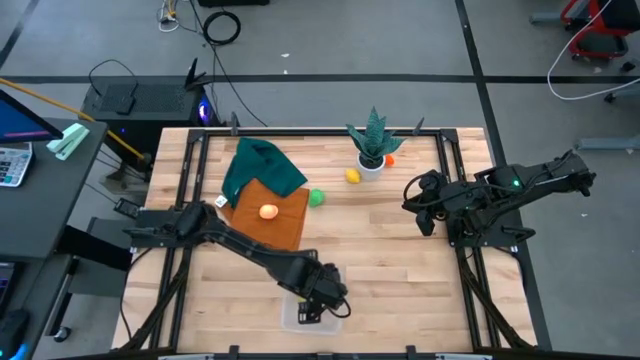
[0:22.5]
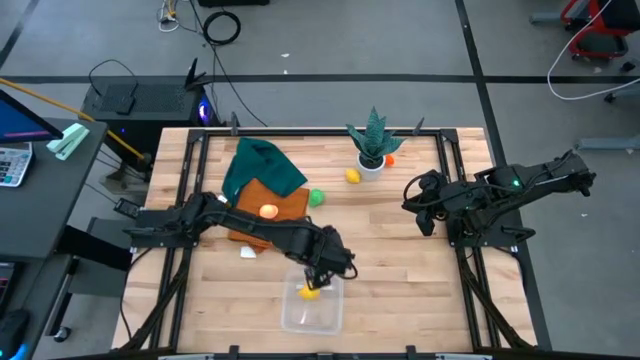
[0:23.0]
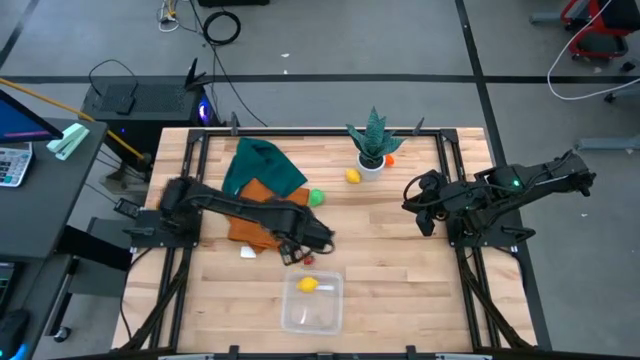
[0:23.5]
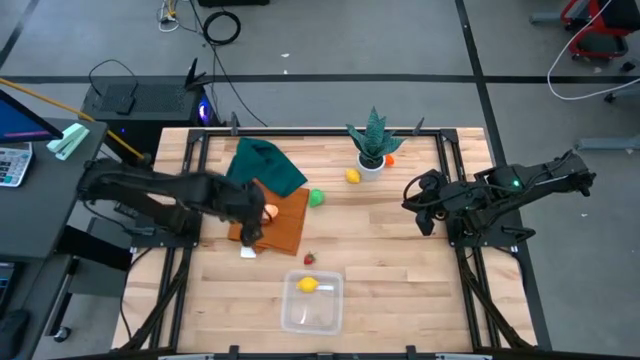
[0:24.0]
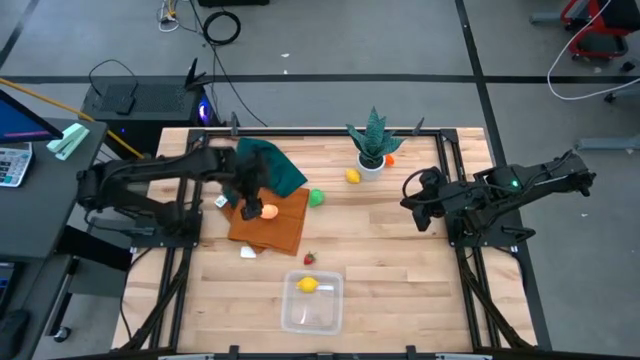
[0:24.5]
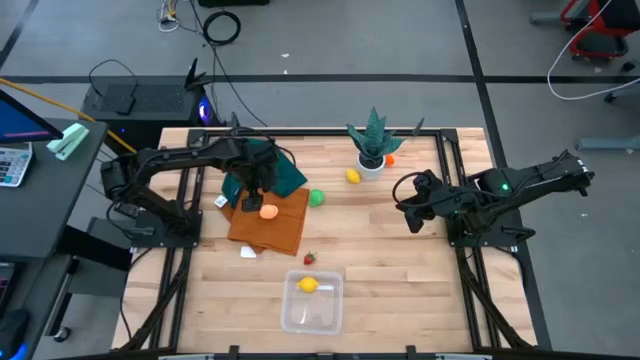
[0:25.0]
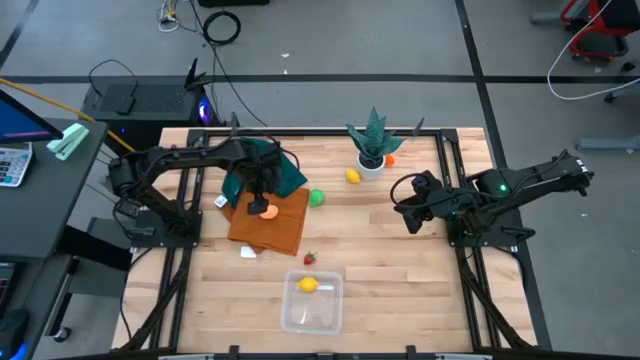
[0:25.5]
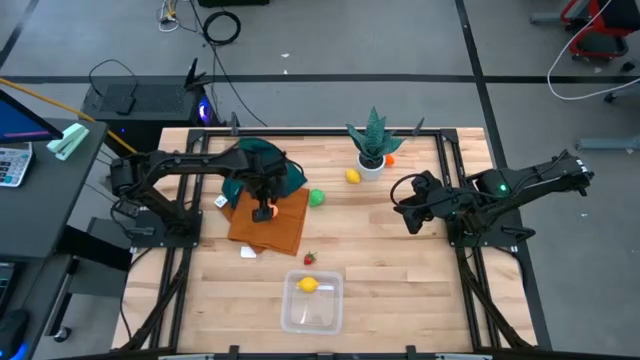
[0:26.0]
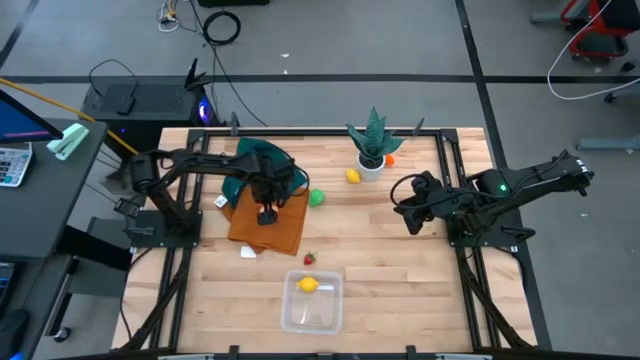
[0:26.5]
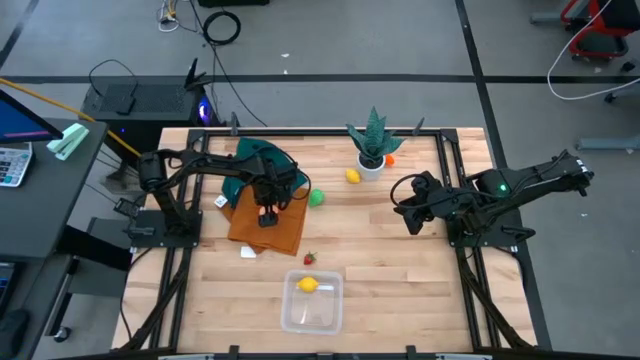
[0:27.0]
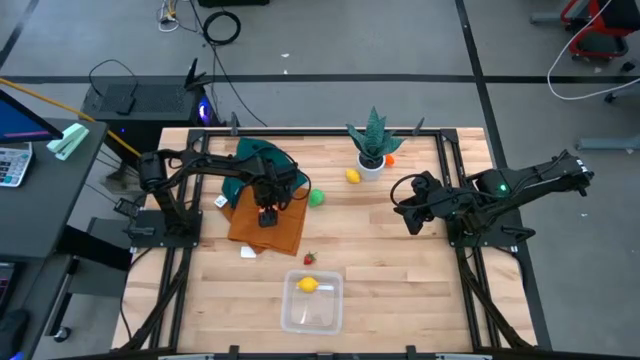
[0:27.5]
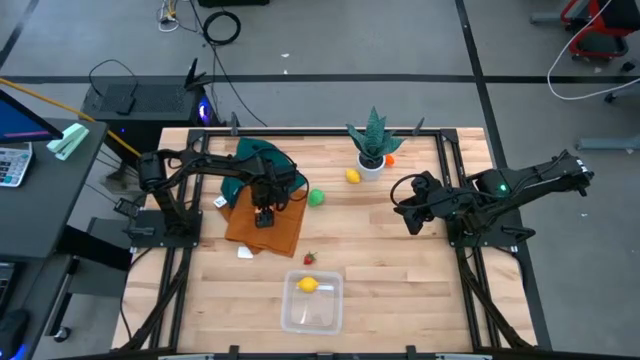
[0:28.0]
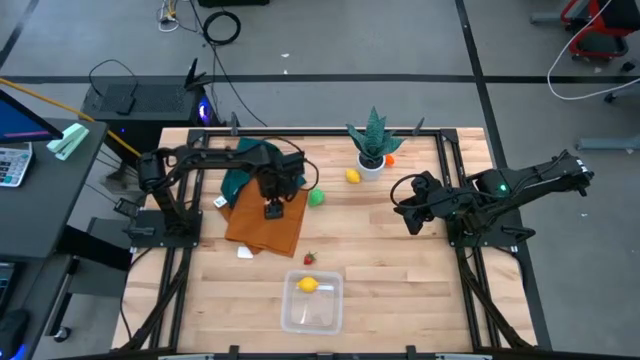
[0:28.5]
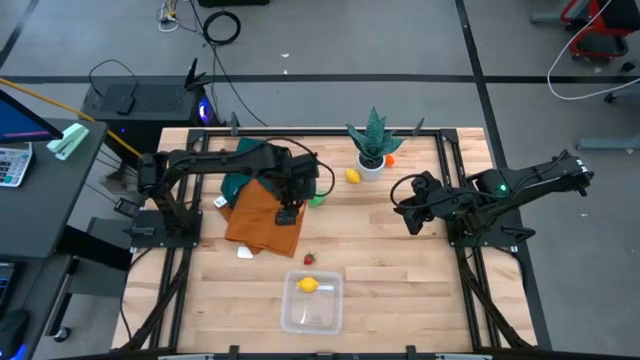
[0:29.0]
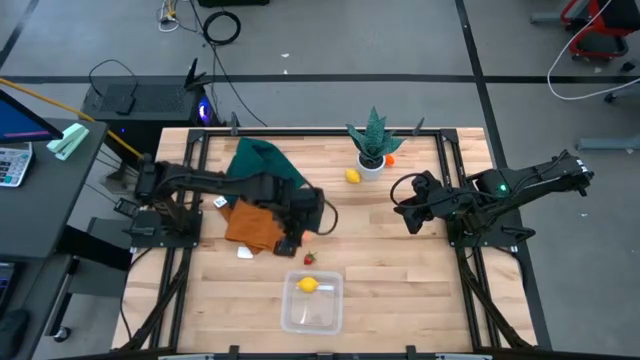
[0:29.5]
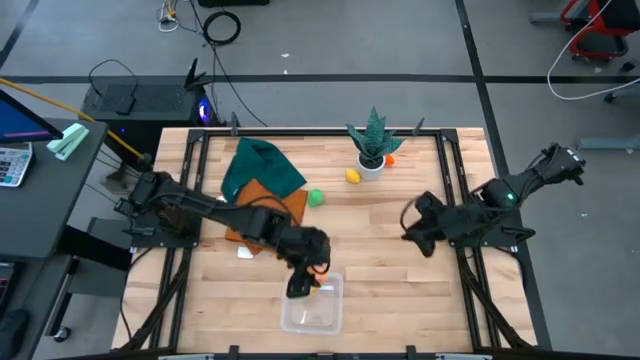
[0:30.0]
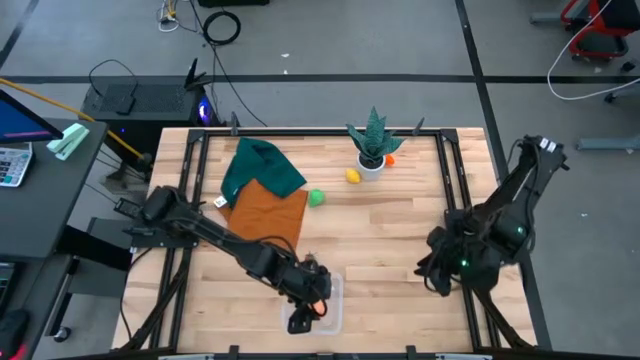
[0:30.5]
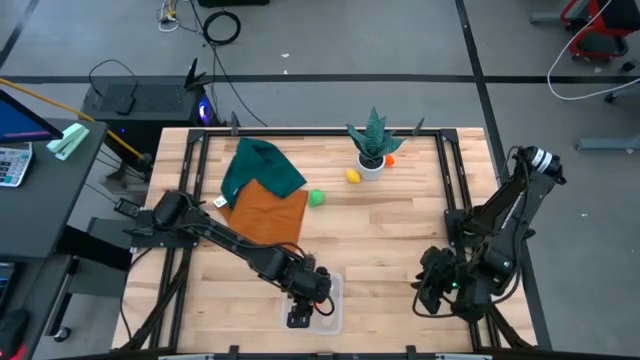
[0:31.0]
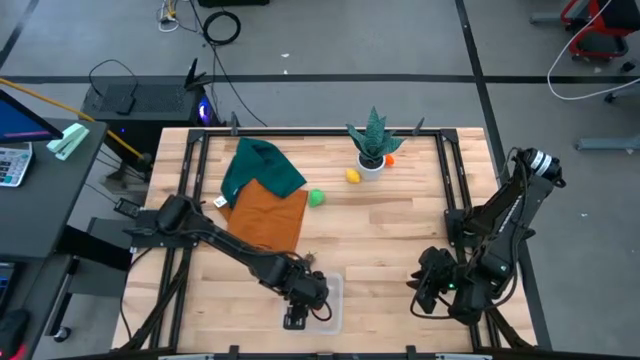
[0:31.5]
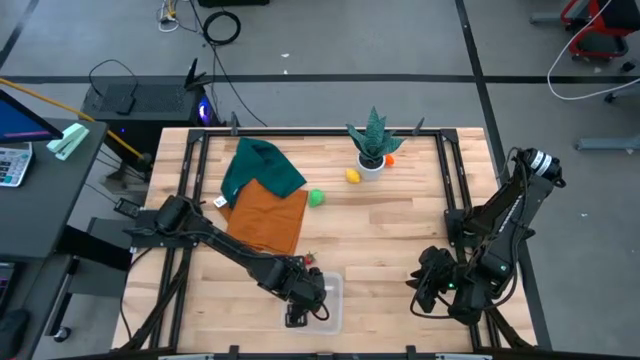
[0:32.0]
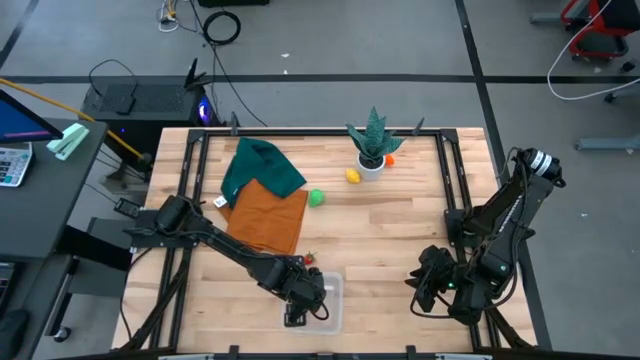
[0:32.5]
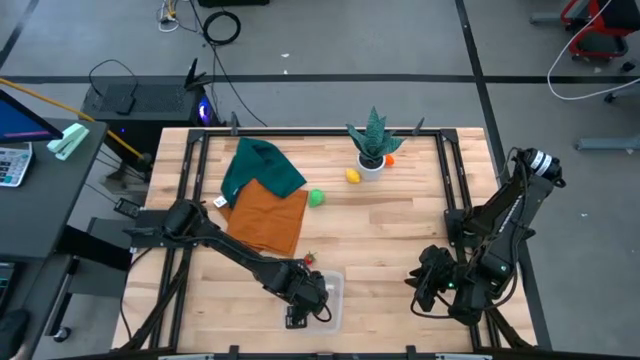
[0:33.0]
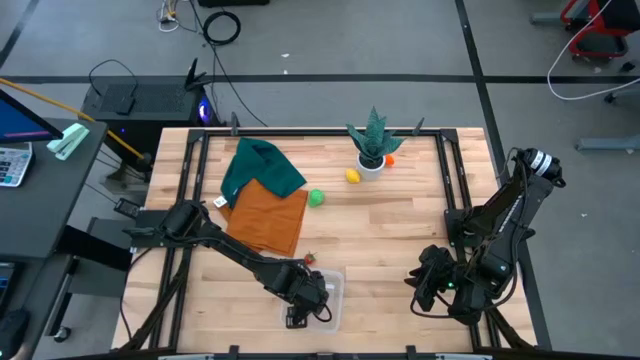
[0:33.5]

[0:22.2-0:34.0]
Task: Pick and placing Produce into tupperware
Put the pink peach into the transparent bin

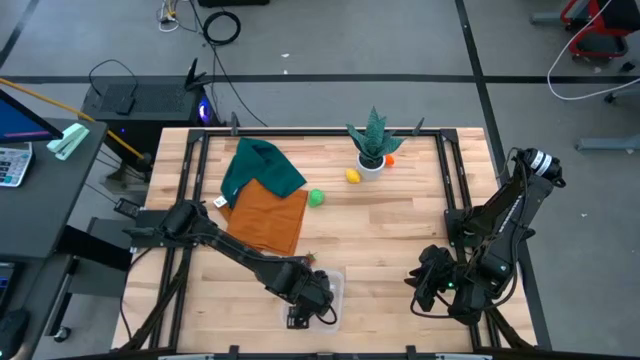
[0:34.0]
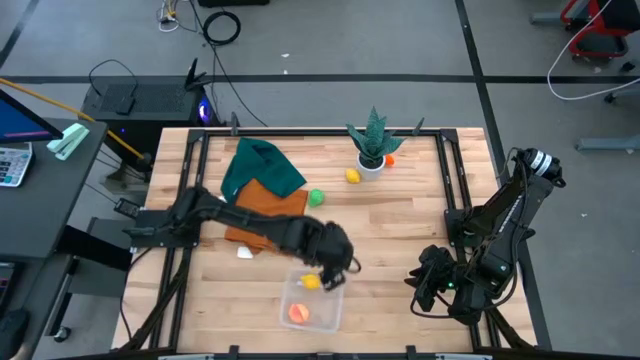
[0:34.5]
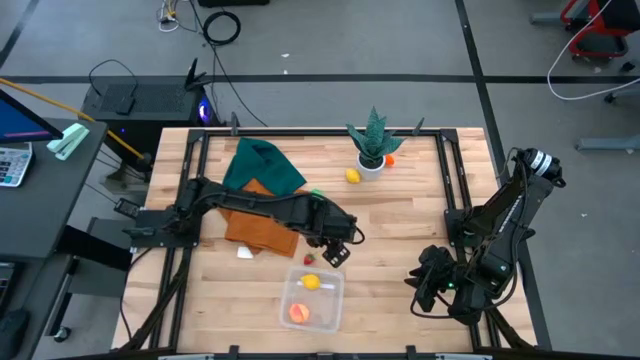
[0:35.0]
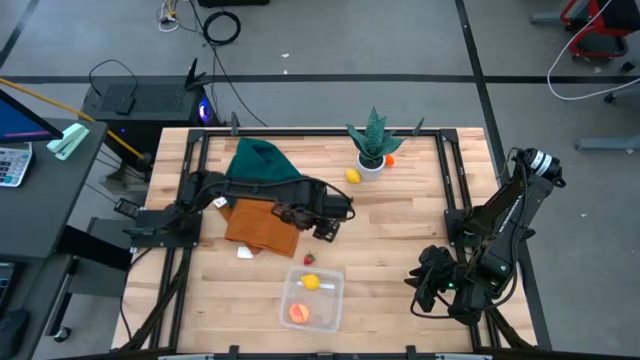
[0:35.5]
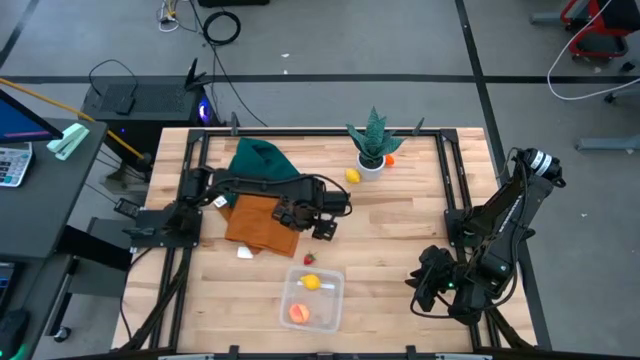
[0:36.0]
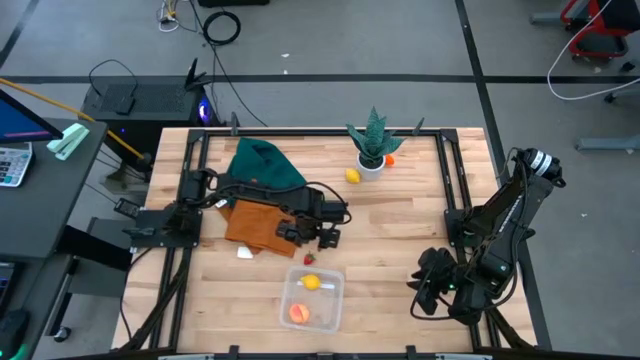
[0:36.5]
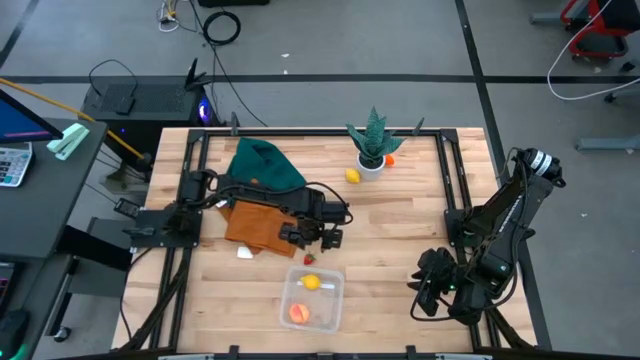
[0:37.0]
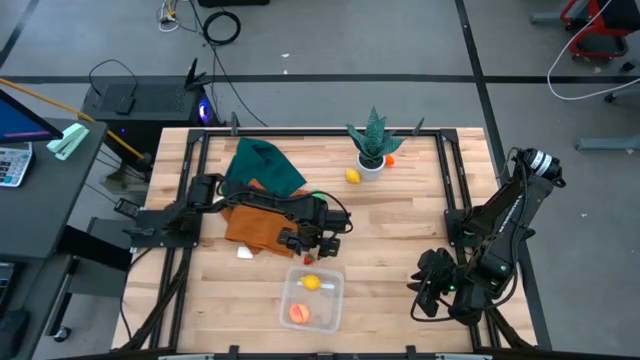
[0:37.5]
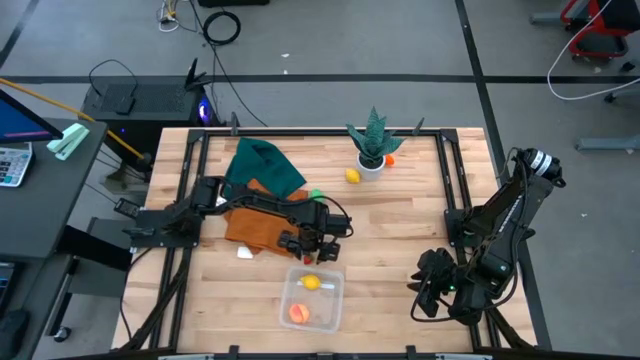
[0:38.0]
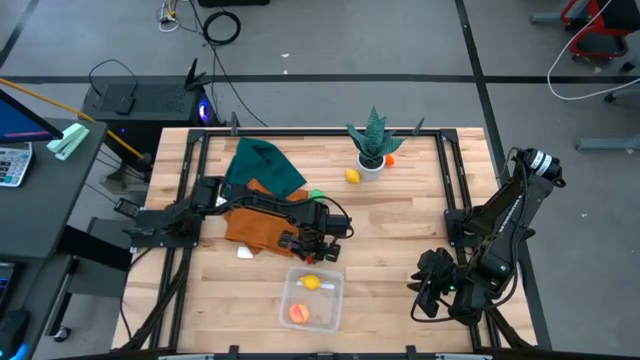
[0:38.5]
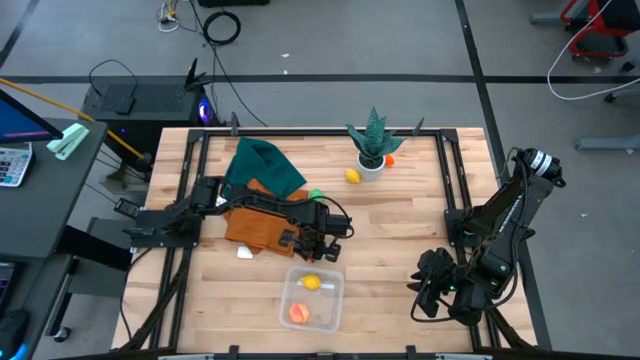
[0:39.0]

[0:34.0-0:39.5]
Put the red strawberry into the transparent bin

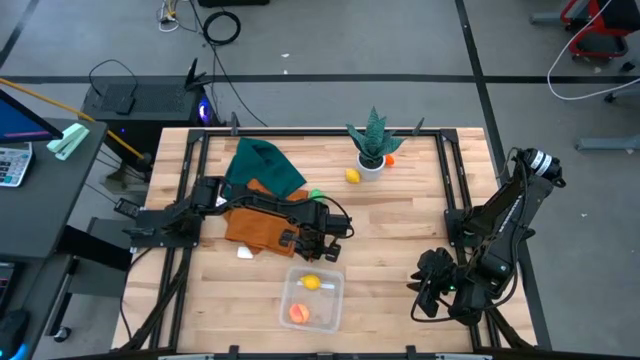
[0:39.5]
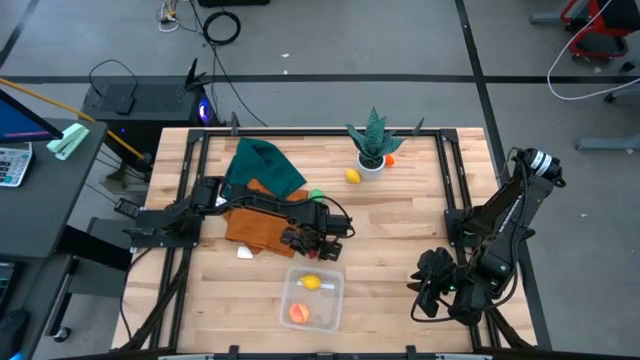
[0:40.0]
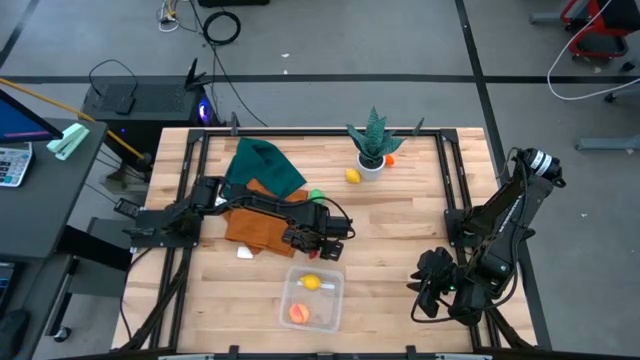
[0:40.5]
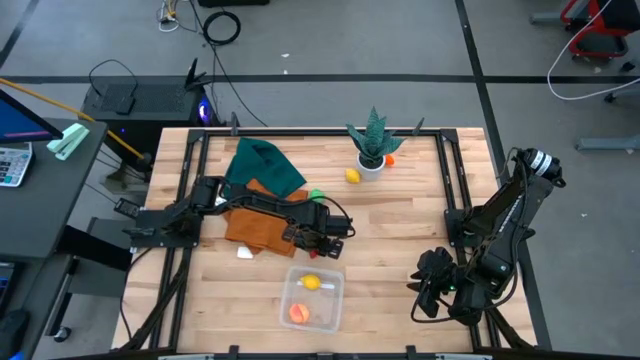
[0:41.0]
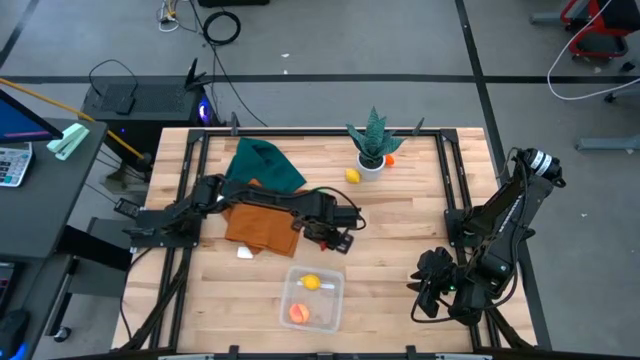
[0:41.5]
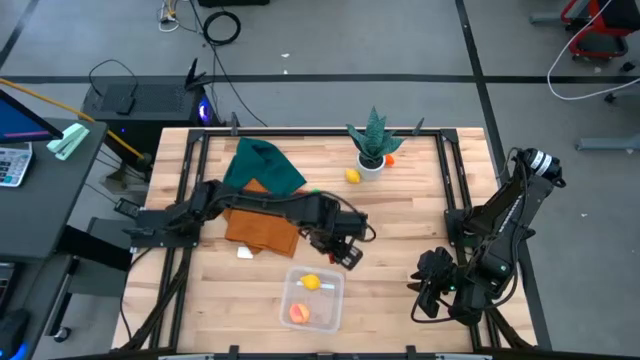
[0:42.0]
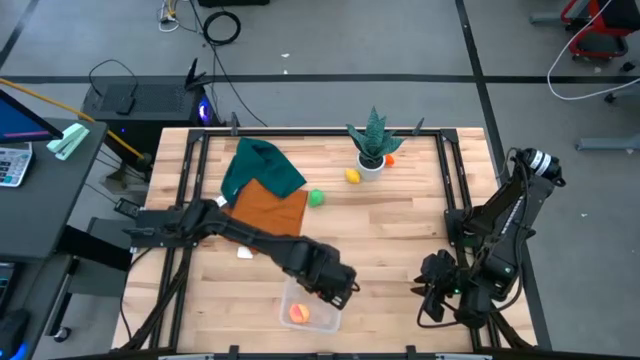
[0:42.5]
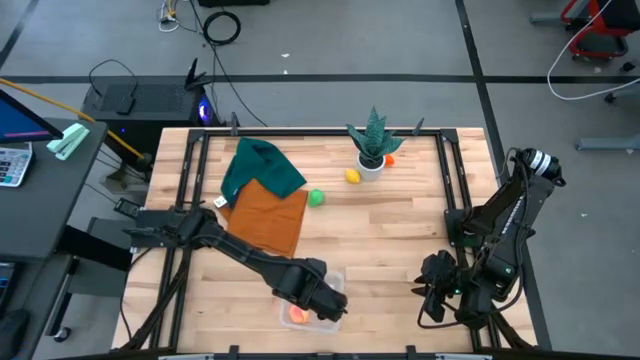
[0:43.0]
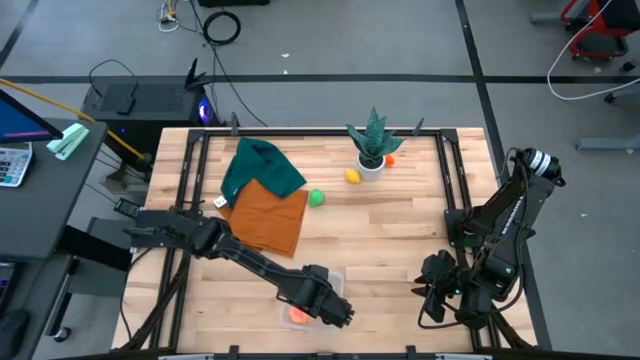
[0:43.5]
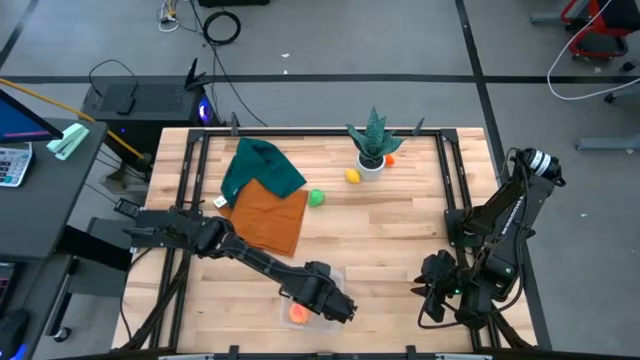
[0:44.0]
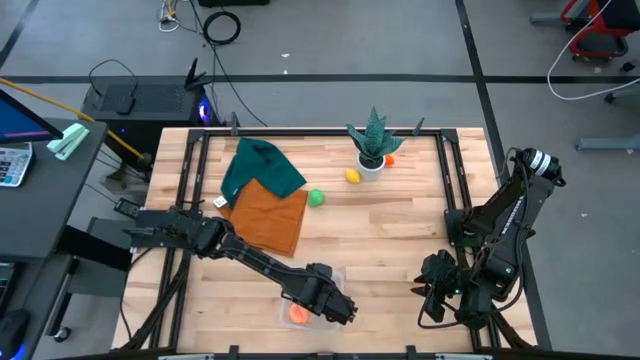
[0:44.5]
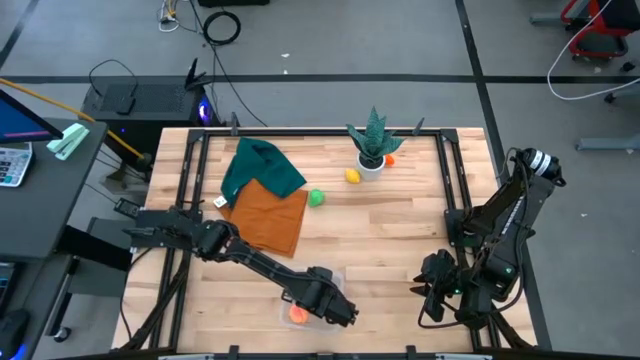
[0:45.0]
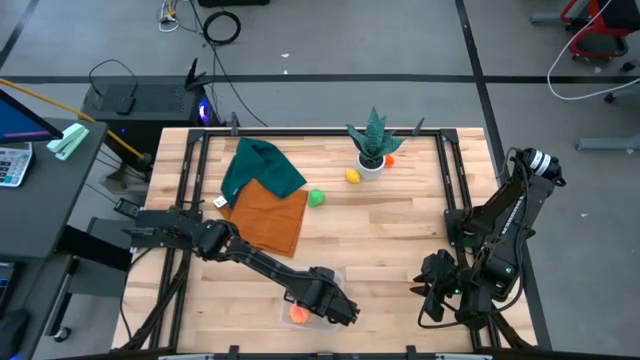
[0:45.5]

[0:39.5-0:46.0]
Put the red strawberry into the transparent bin
